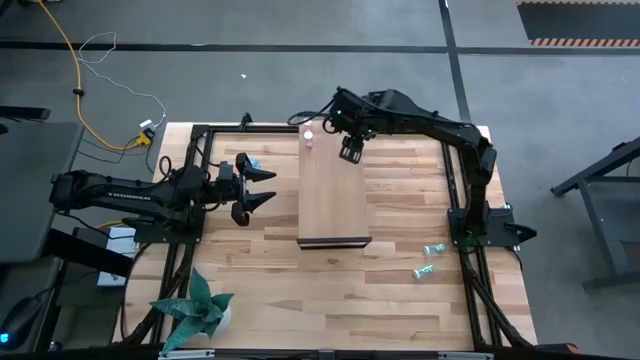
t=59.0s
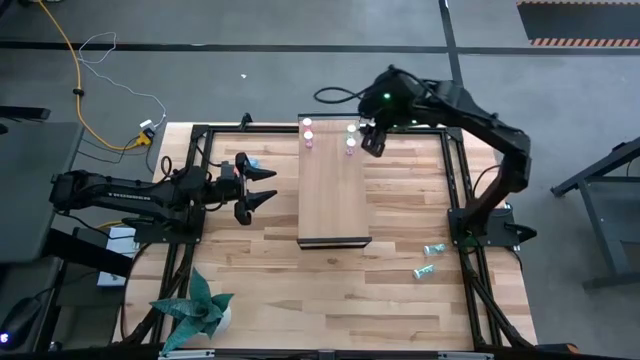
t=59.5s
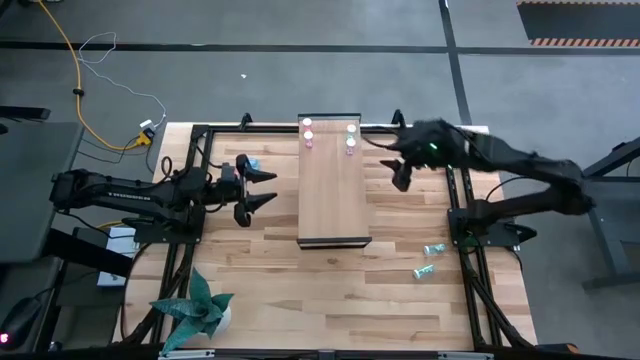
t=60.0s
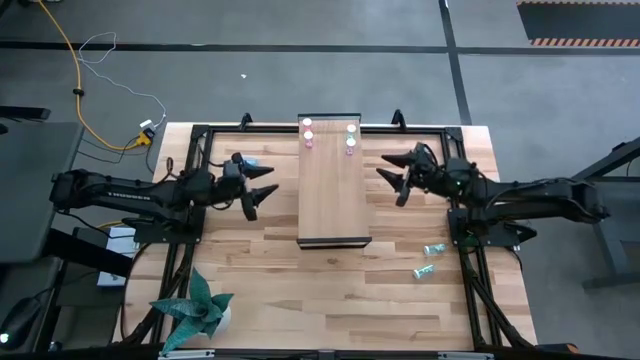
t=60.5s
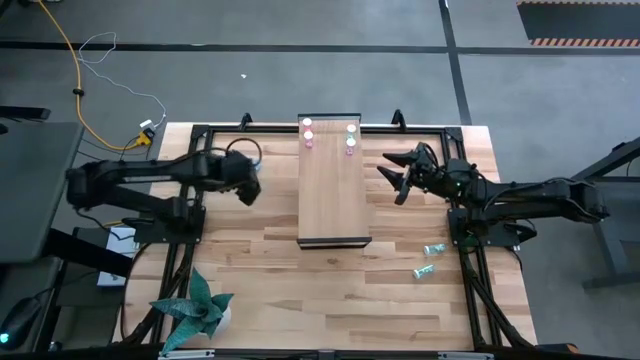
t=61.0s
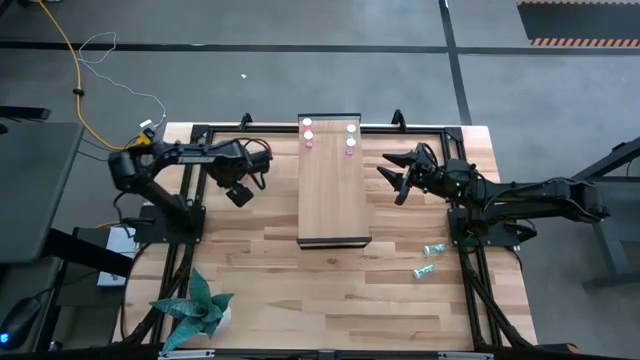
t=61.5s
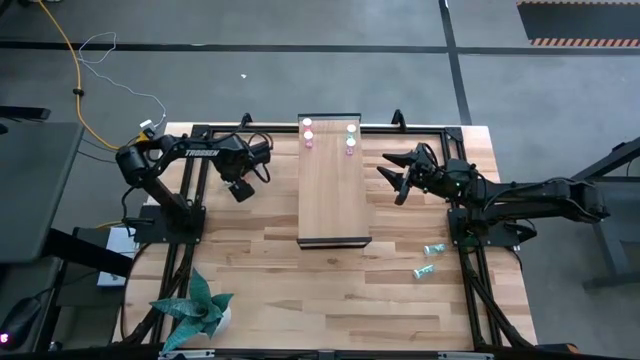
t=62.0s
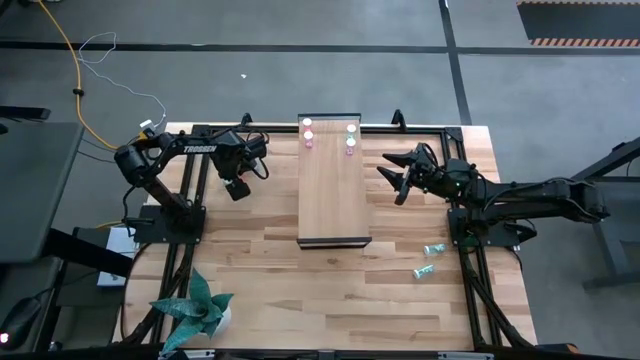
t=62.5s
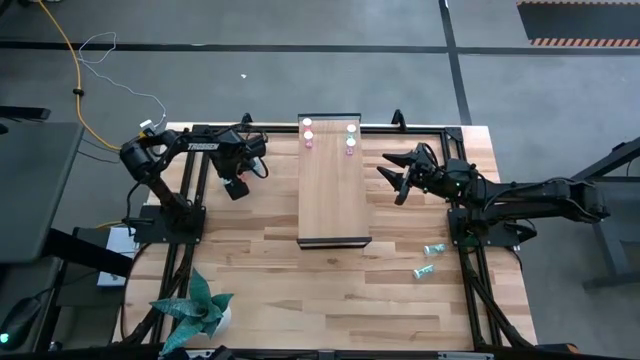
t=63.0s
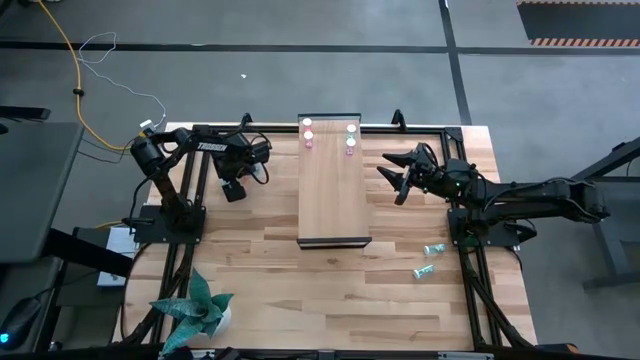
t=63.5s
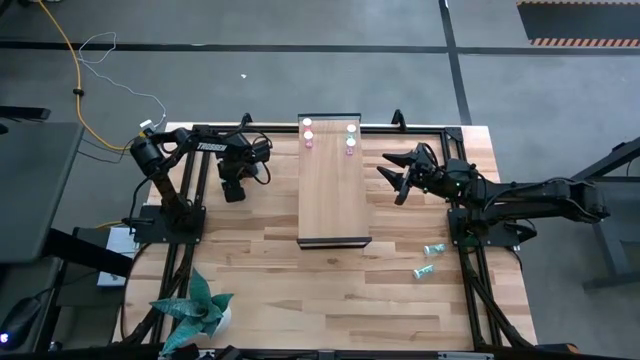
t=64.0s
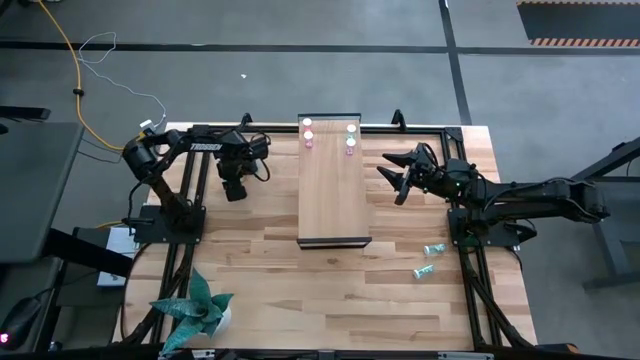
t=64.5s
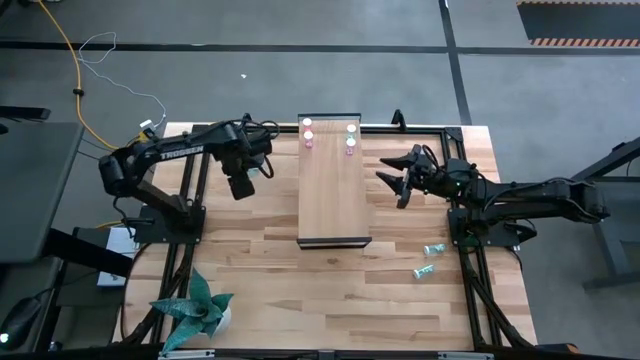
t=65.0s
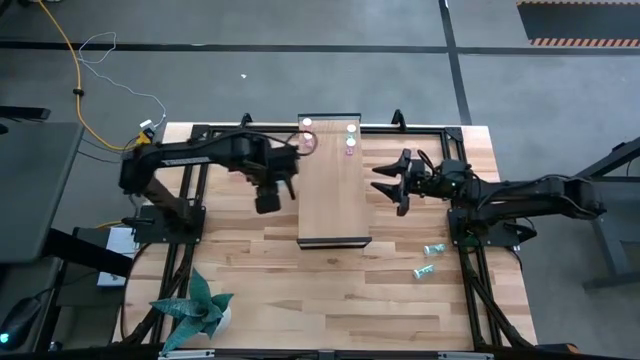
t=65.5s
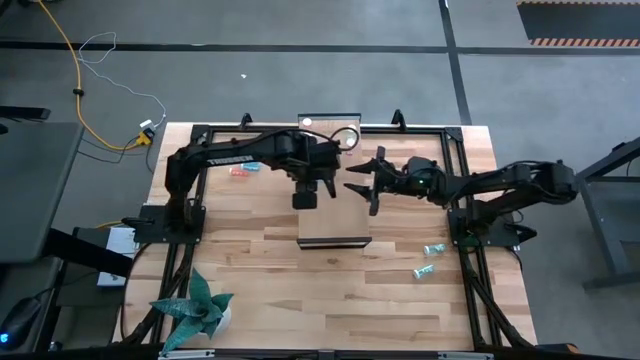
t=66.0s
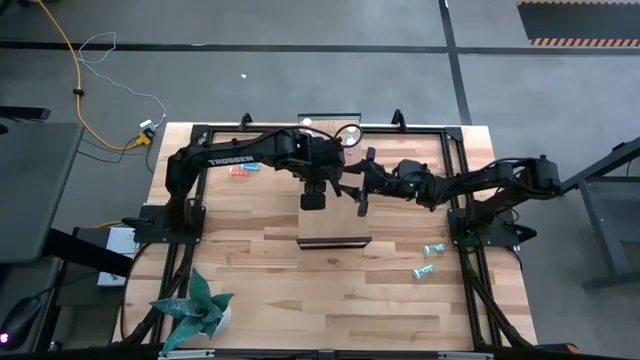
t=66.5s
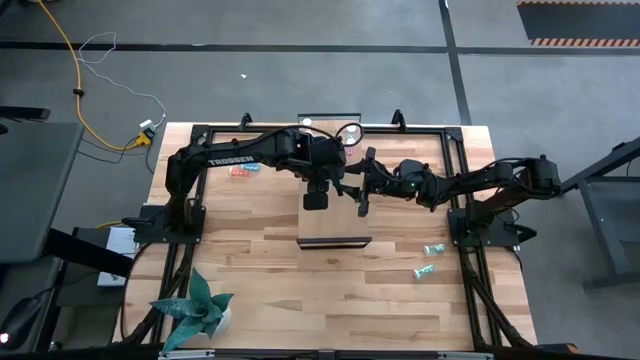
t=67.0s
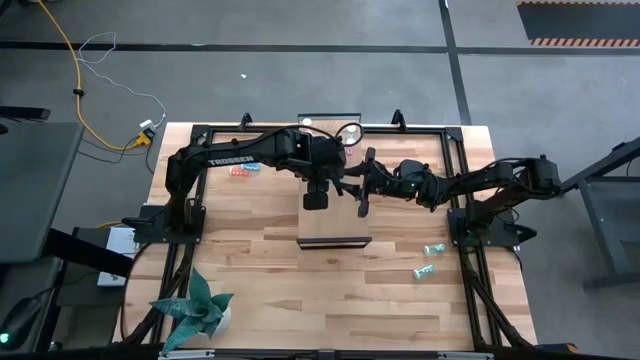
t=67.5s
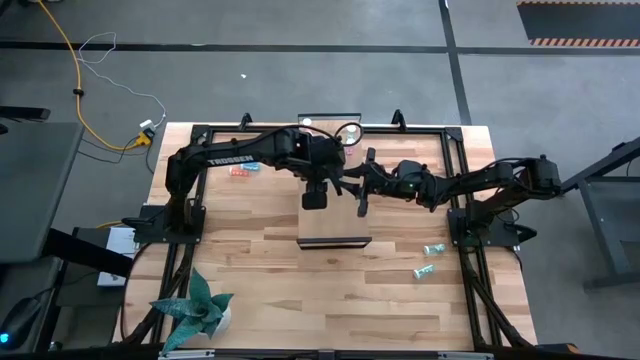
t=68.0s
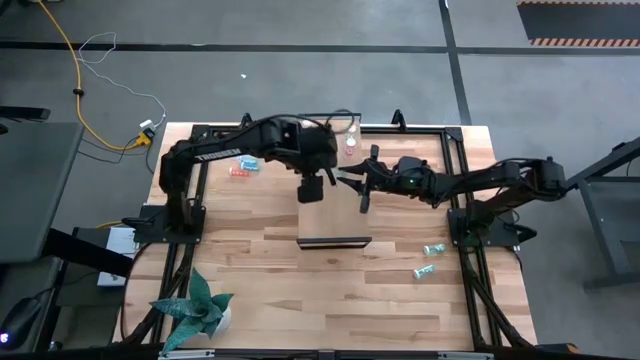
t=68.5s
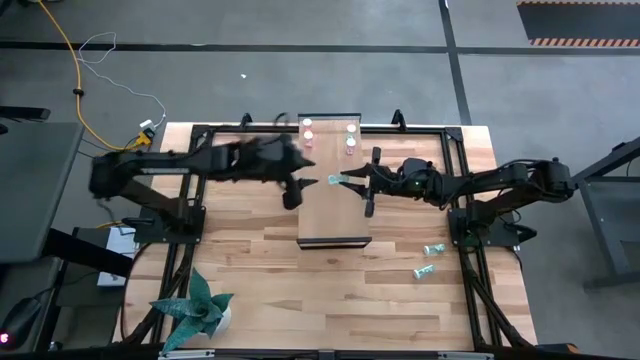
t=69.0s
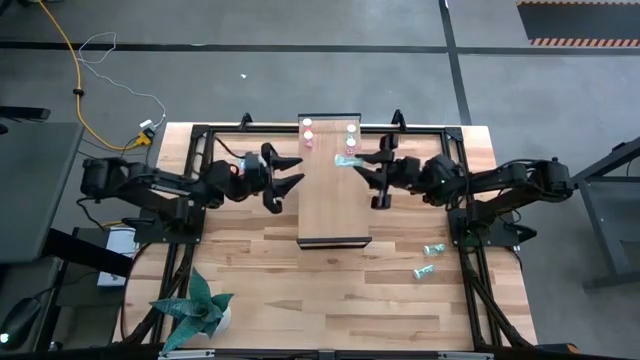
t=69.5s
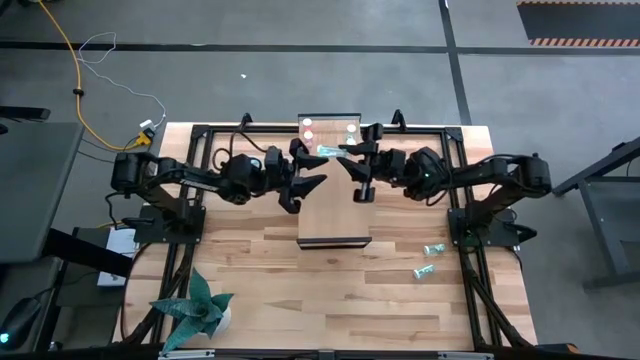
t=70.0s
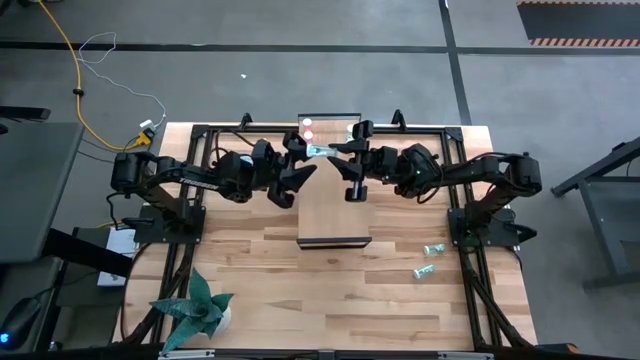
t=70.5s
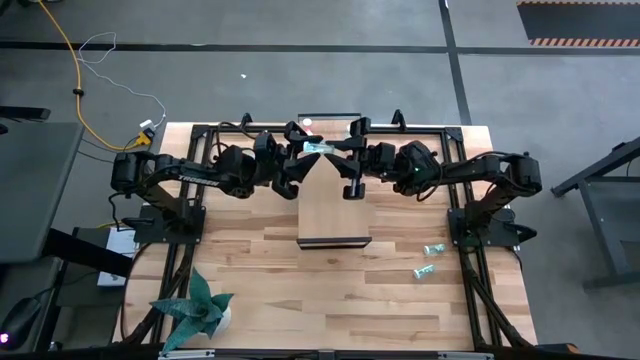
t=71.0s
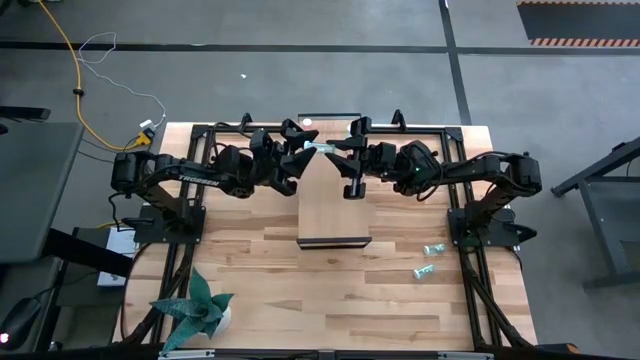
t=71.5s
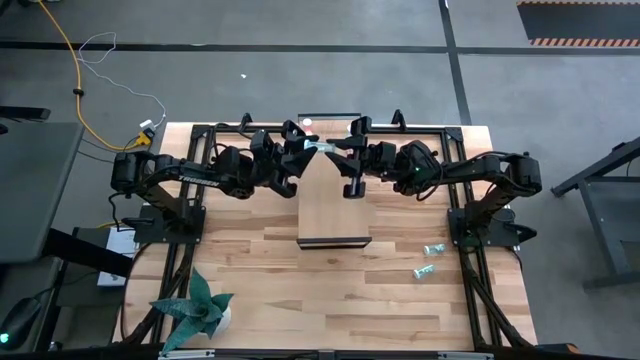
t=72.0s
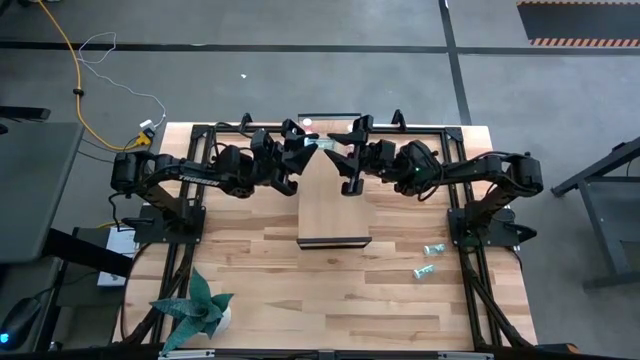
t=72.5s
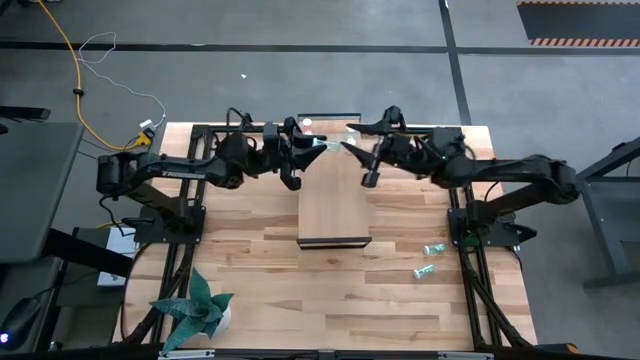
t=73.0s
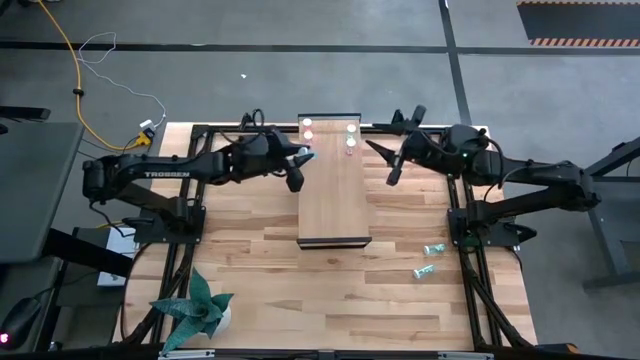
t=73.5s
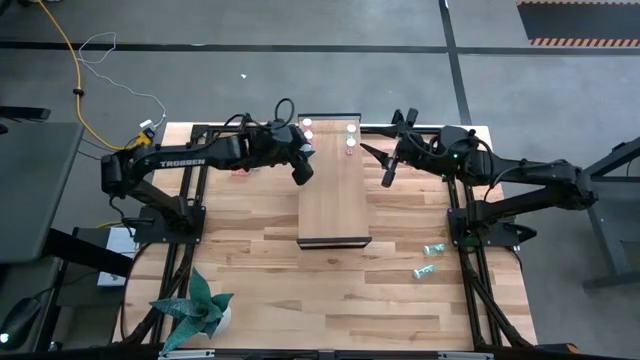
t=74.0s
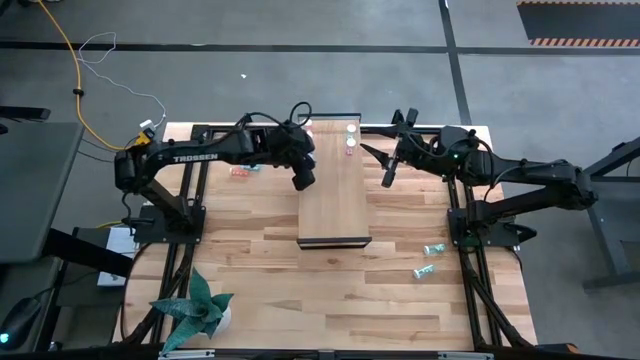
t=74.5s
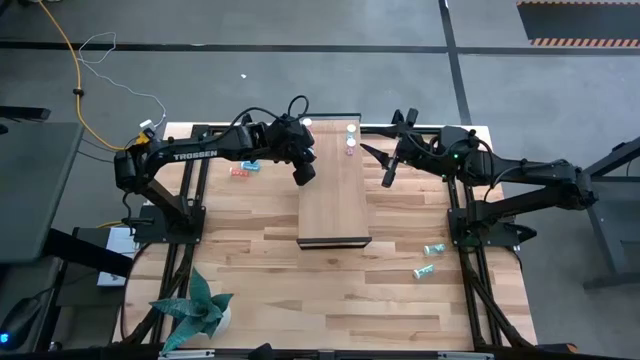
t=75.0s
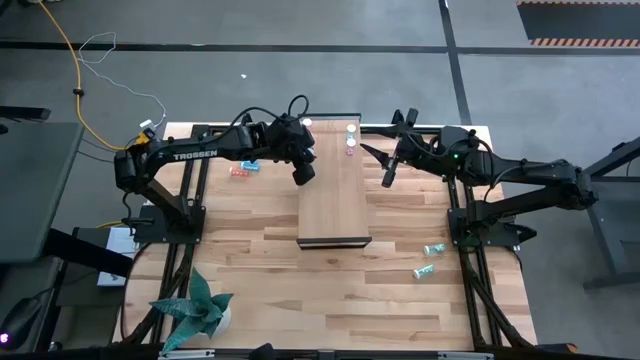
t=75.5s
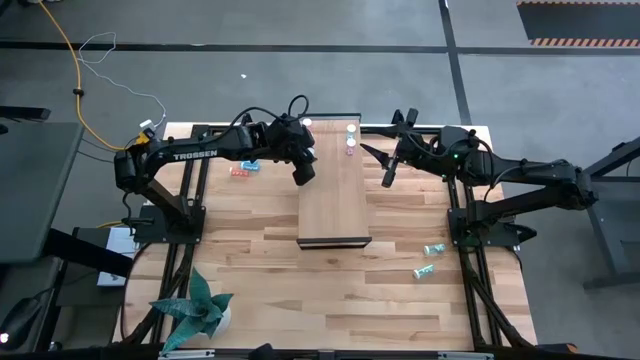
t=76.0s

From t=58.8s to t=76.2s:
Task: Pick and place medicine bottles onto shelf by color
Put the transparent green pill bottle on the shelf

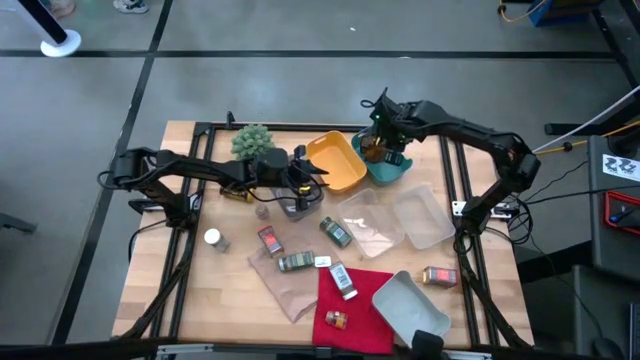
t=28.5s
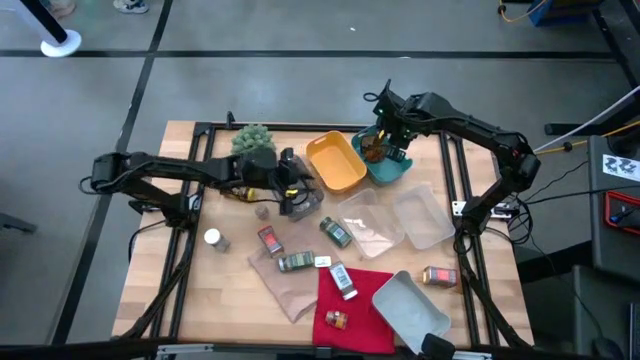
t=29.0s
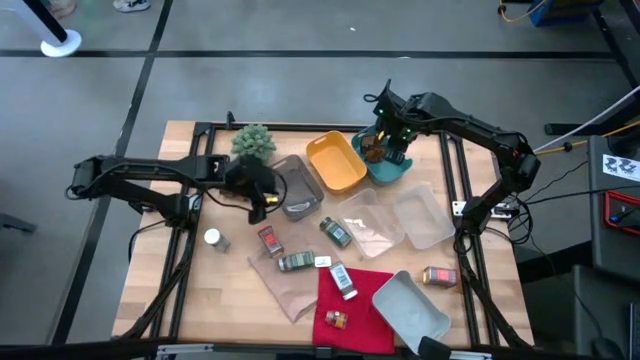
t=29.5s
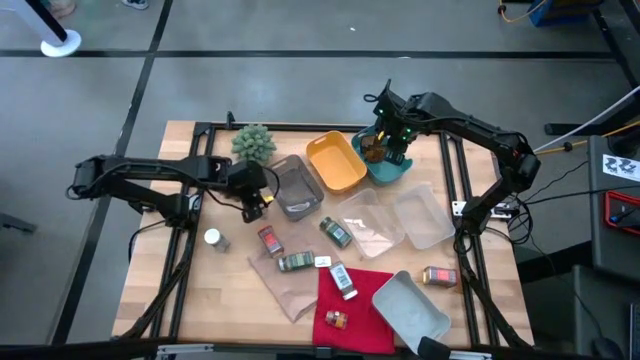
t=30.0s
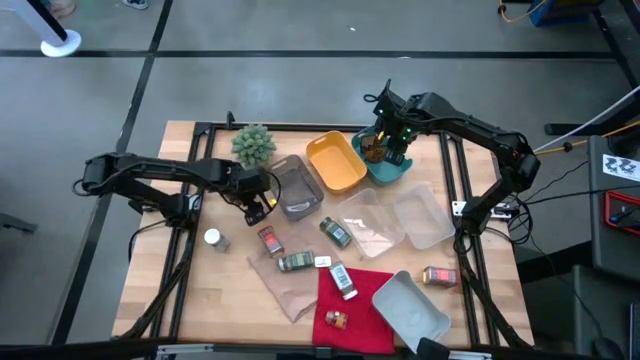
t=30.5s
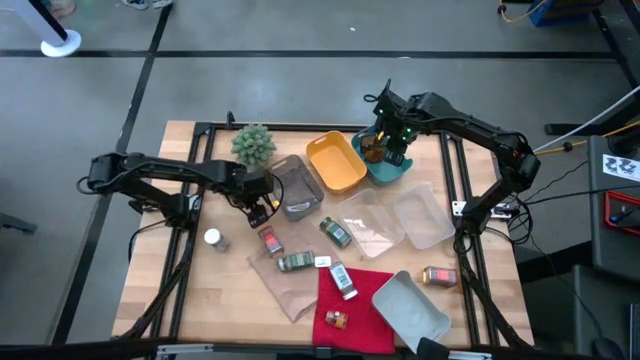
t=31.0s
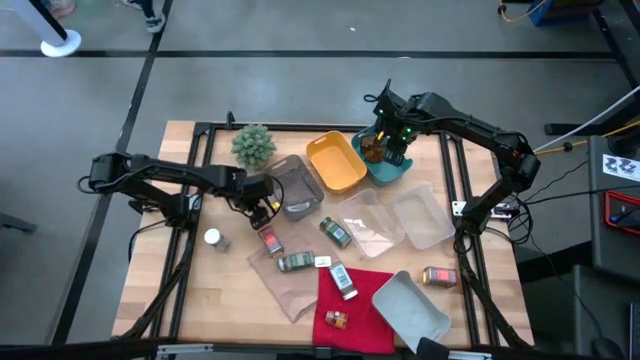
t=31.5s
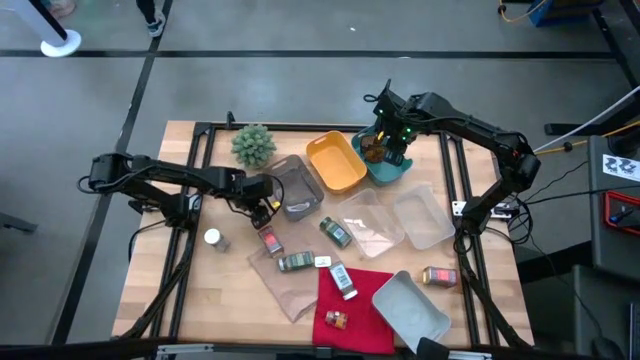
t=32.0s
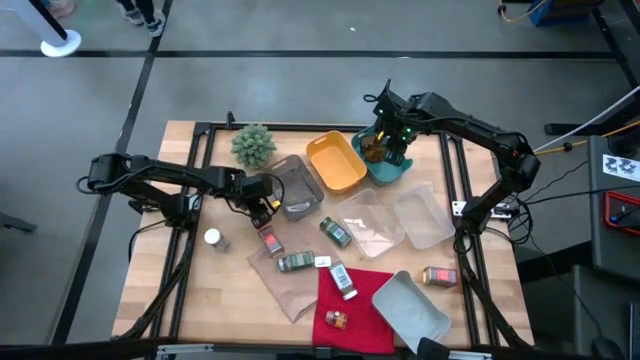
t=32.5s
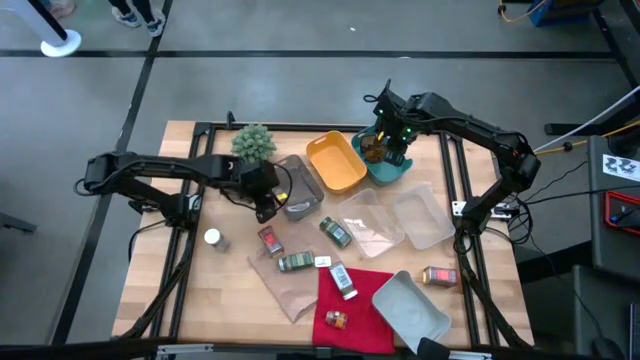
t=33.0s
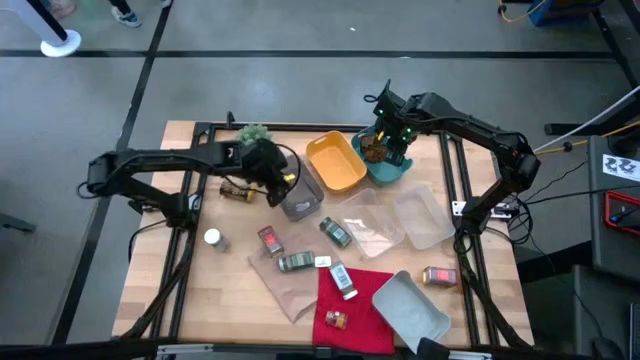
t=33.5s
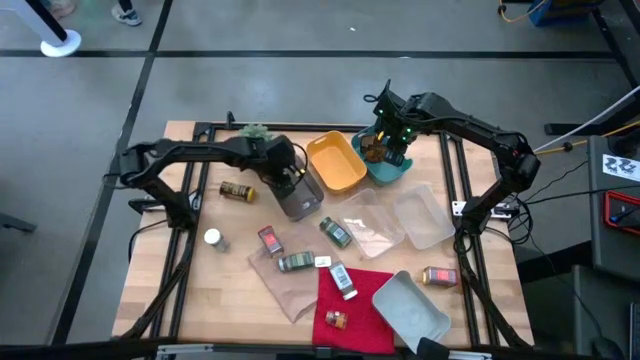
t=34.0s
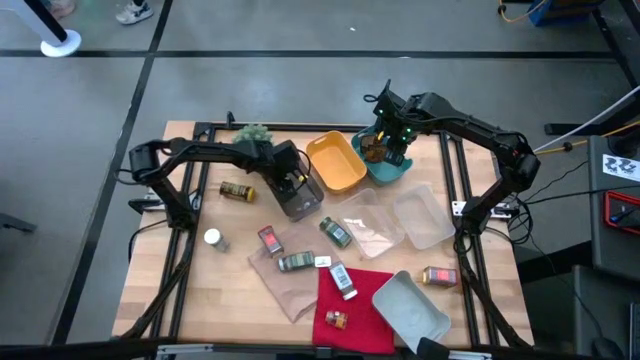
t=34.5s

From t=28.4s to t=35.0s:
Task: Sort spices by type
Put the top brown seasoning bottle into the black bin
